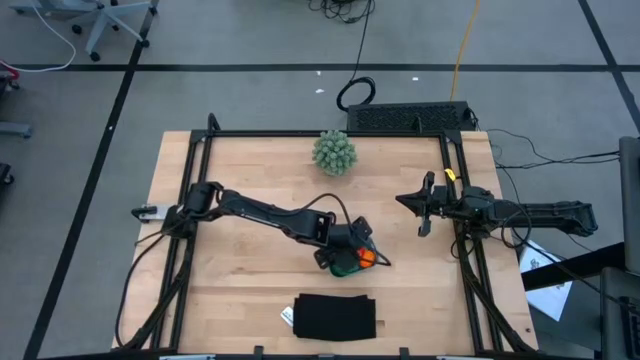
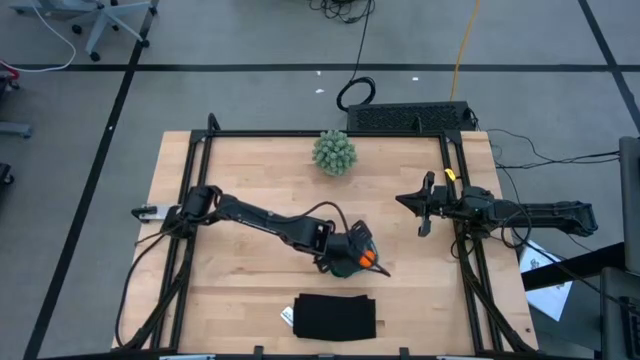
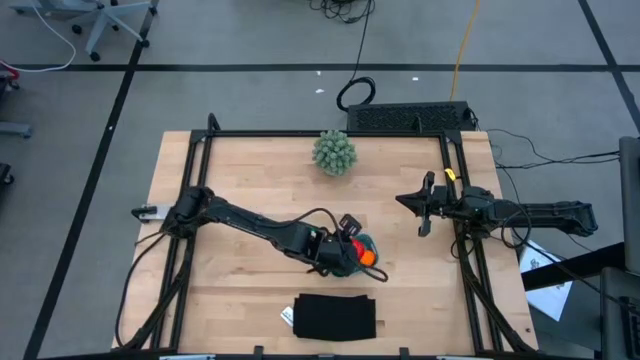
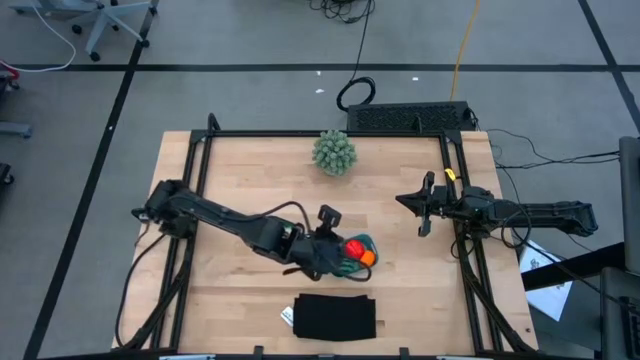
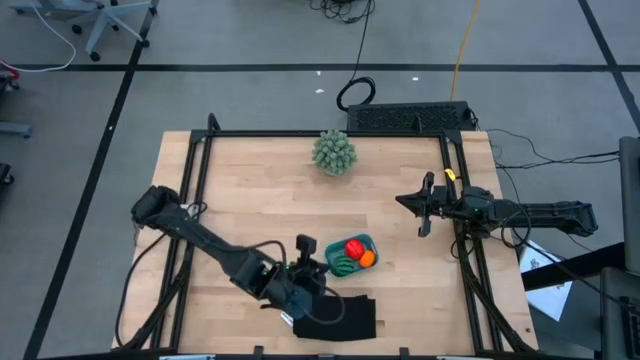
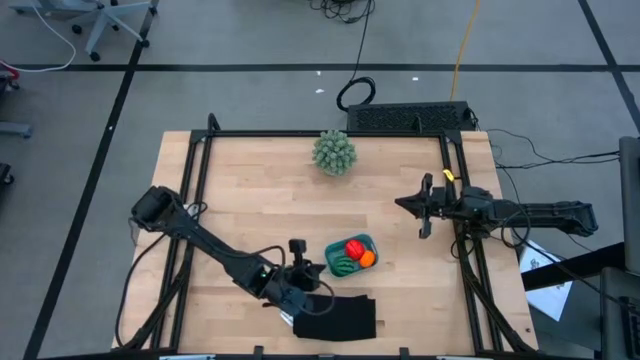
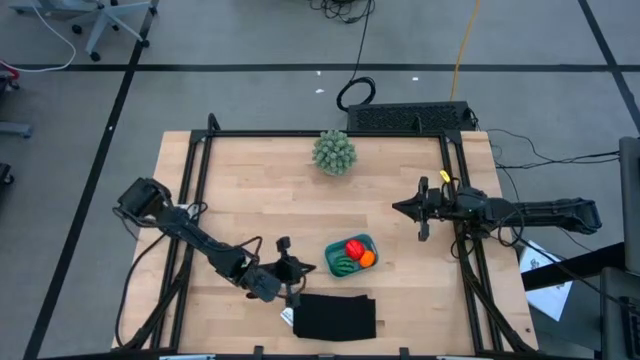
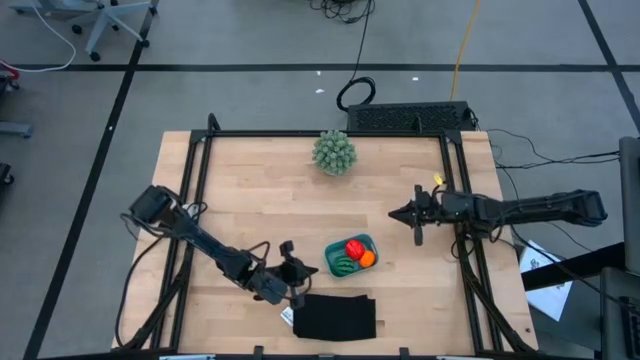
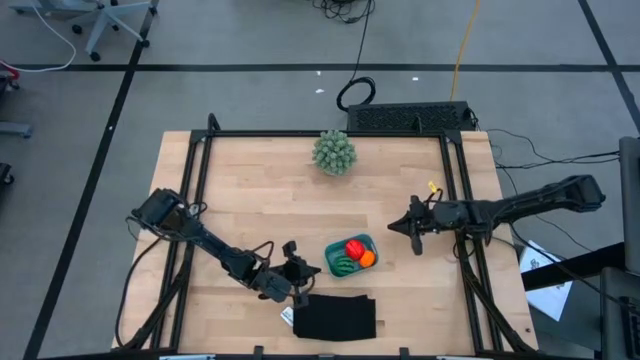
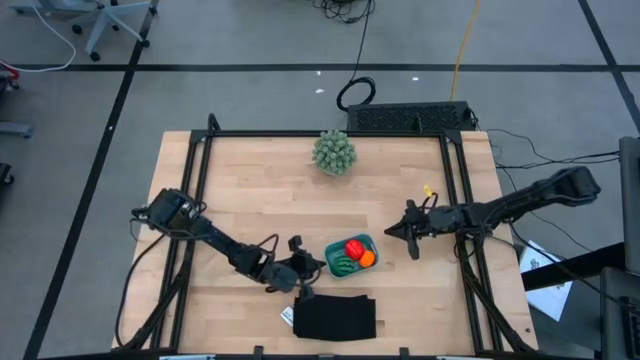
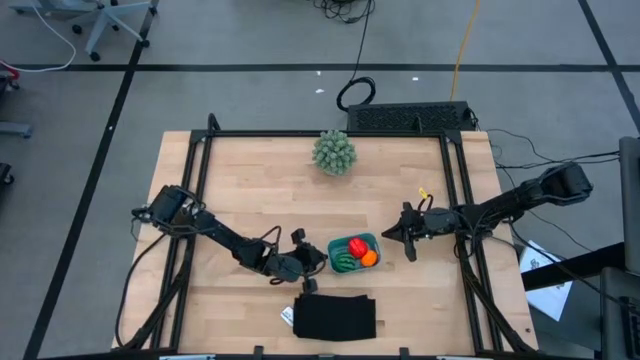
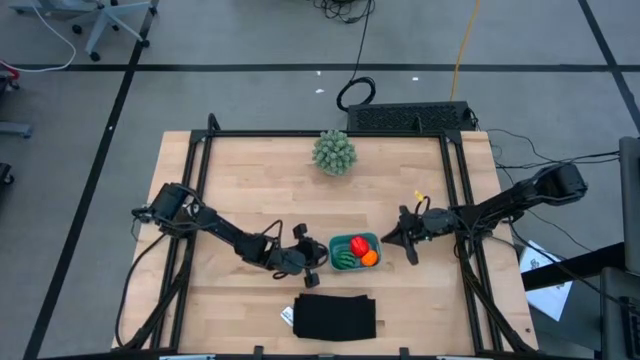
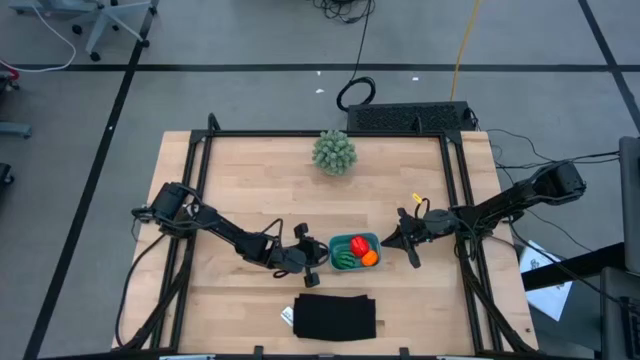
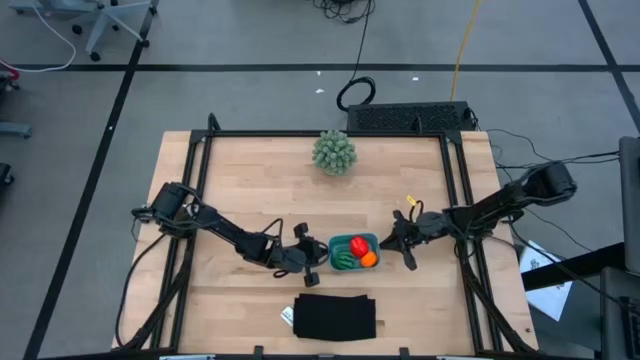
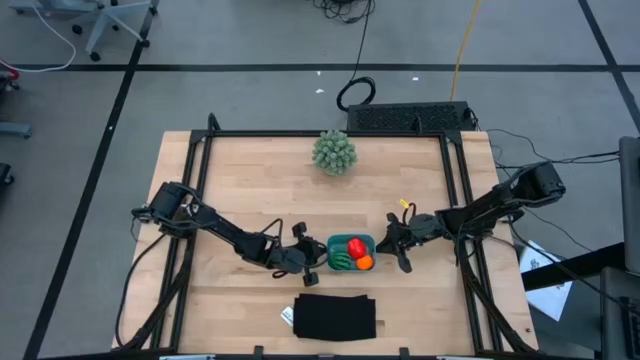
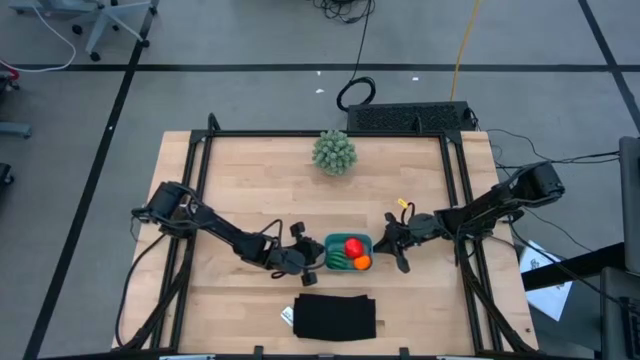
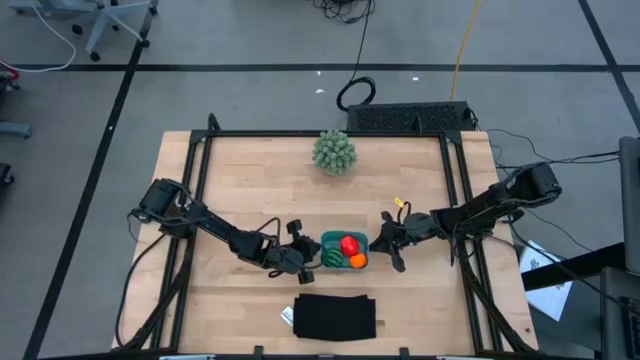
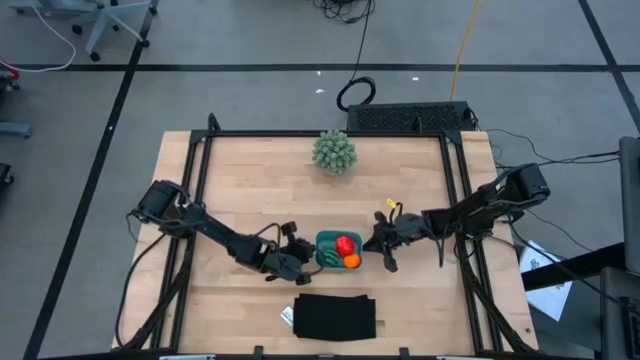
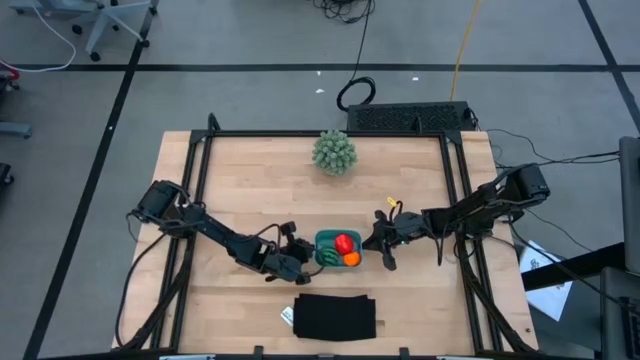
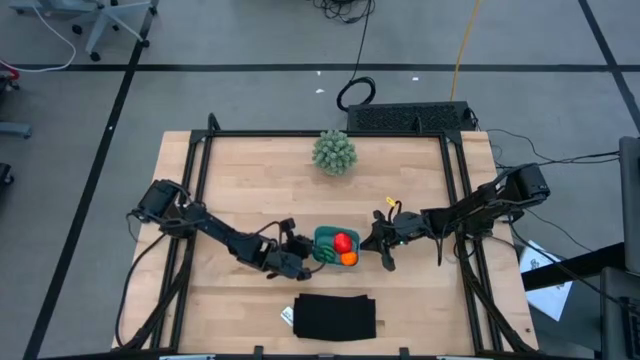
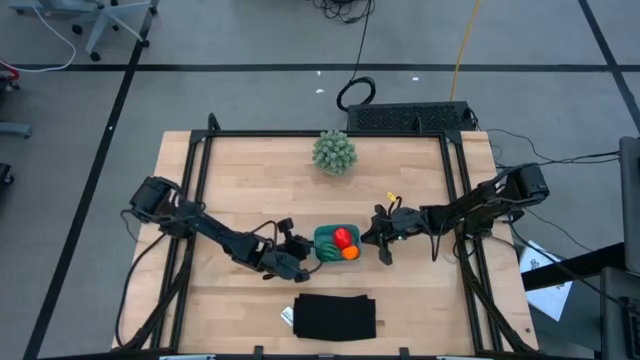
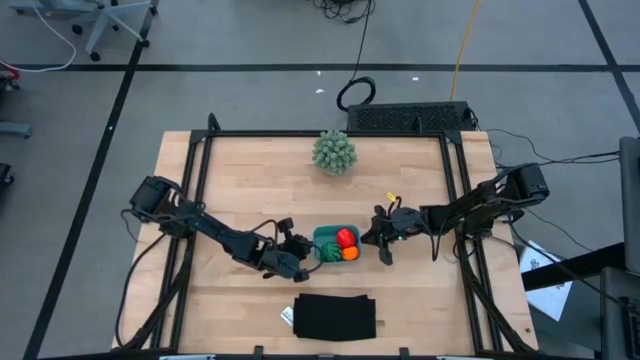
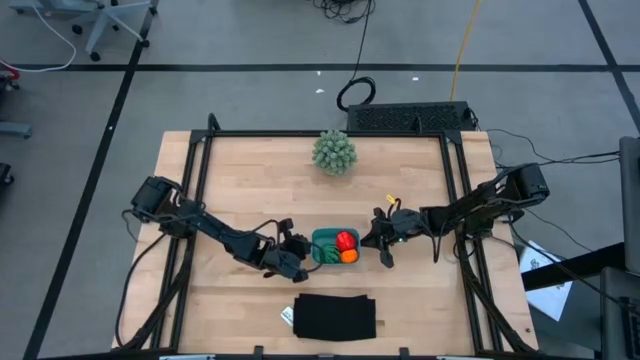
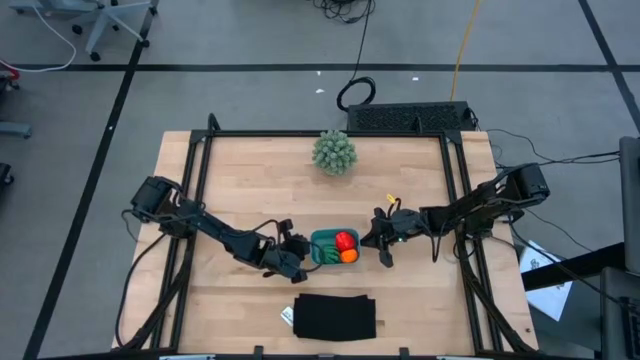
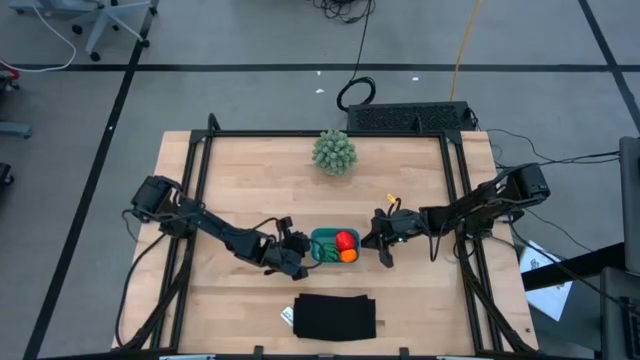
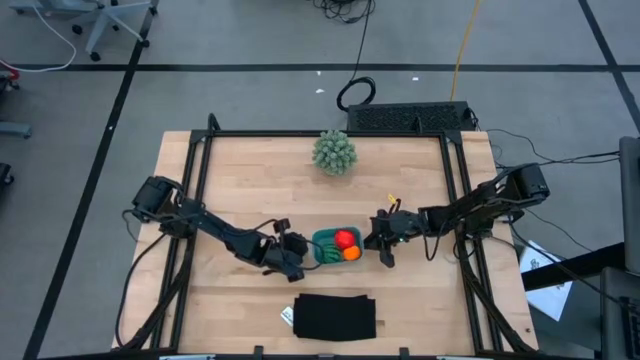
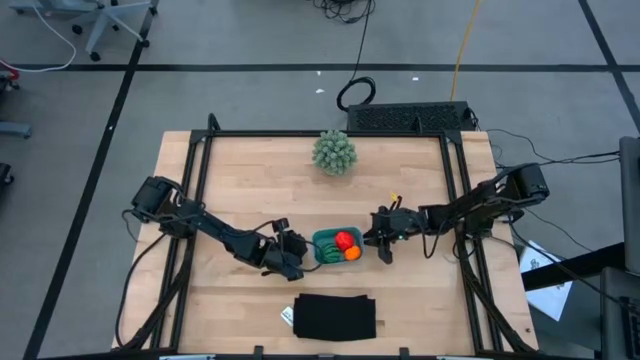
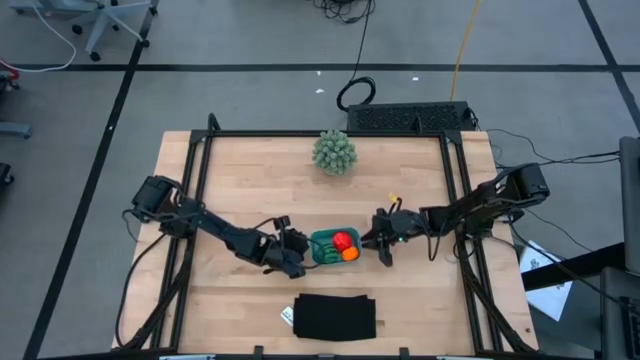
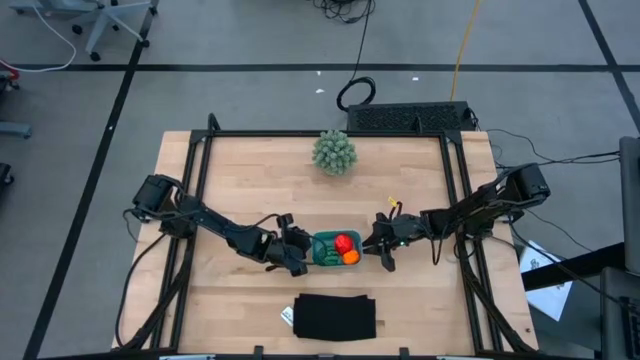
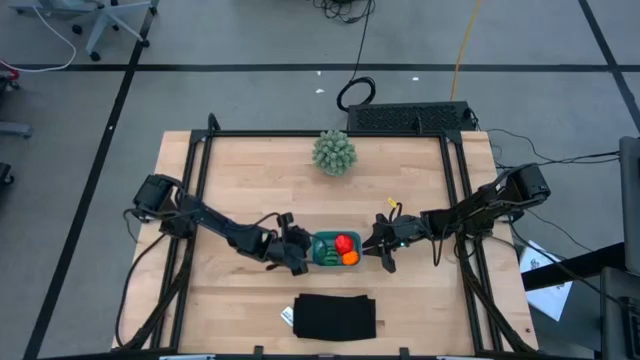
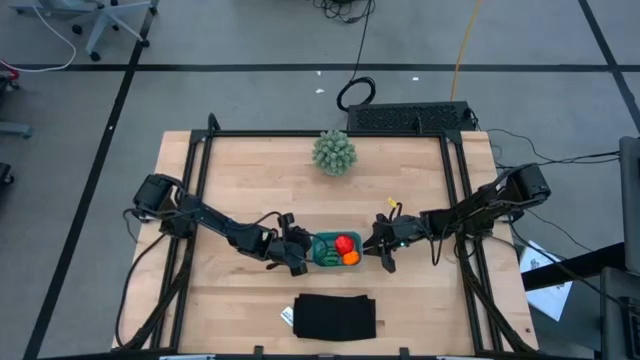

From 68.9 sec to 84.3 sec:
Task: Pick and placing Produce into tupperware
Adjust the blue bin on the table

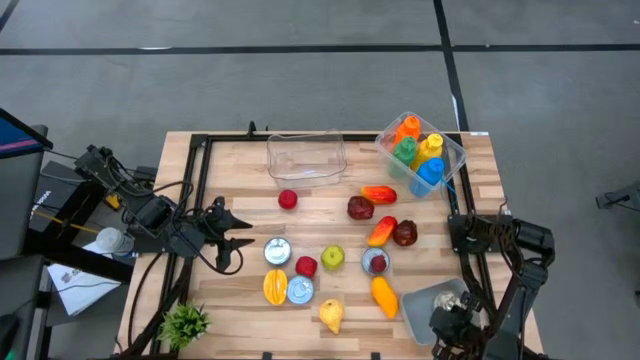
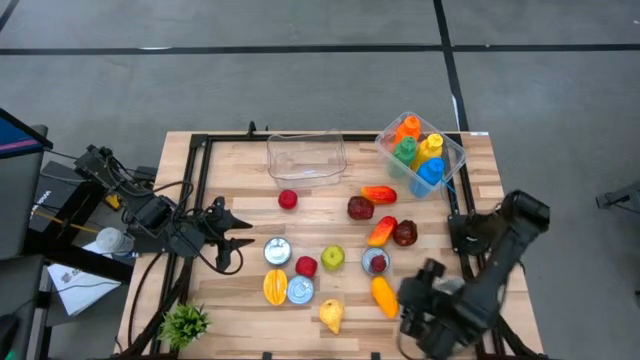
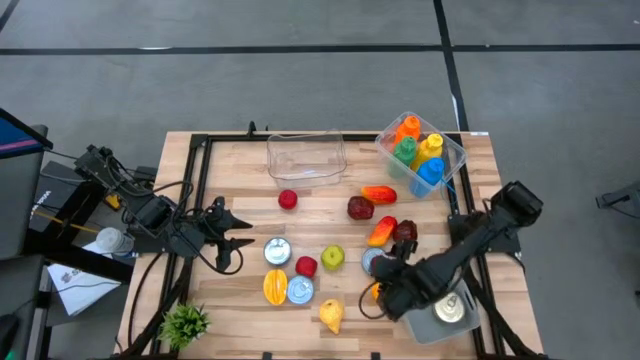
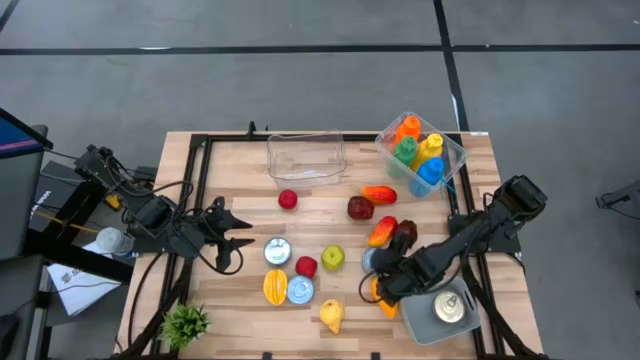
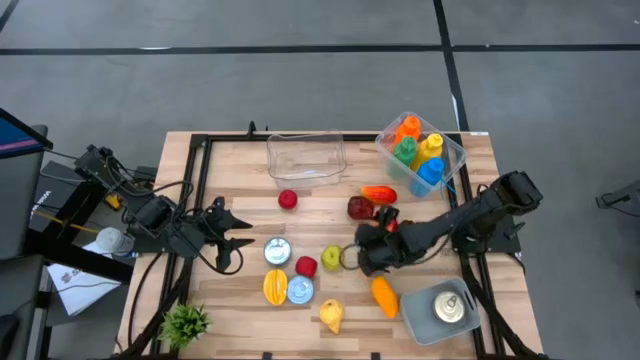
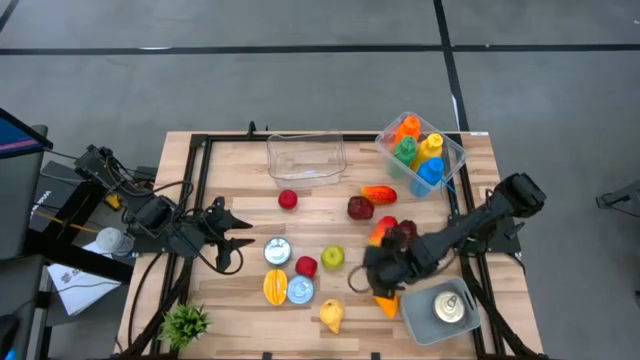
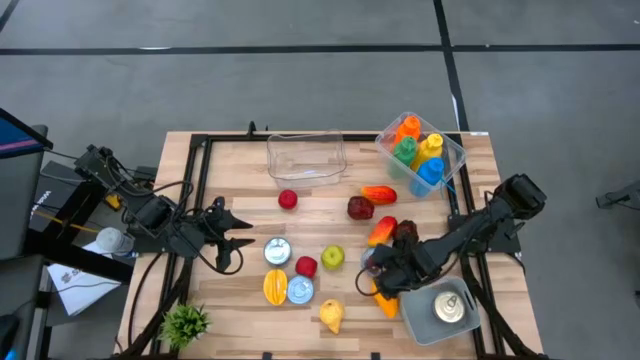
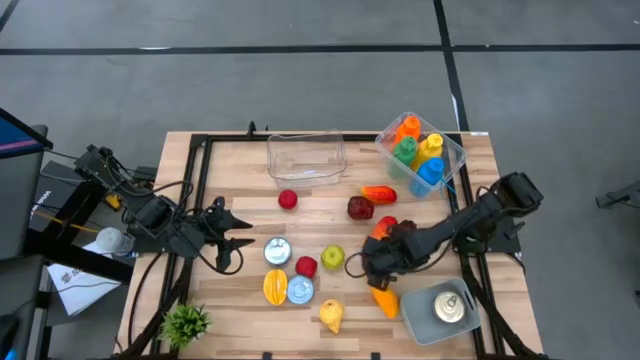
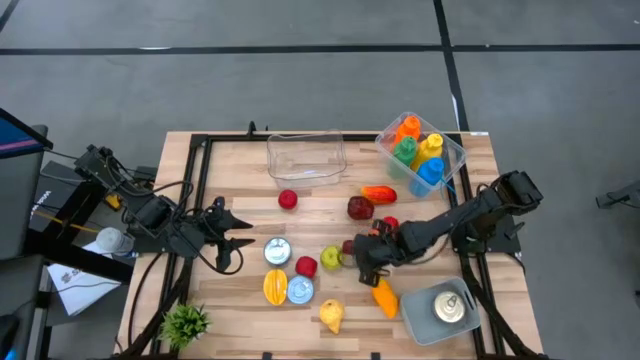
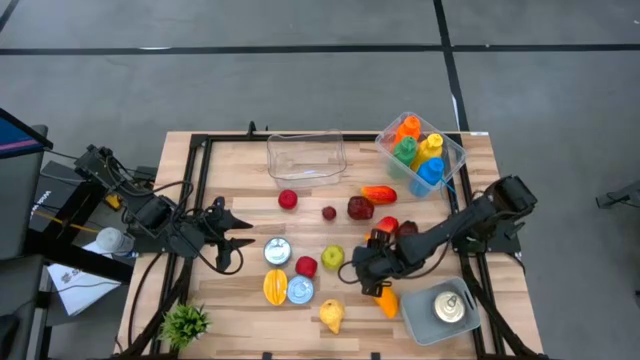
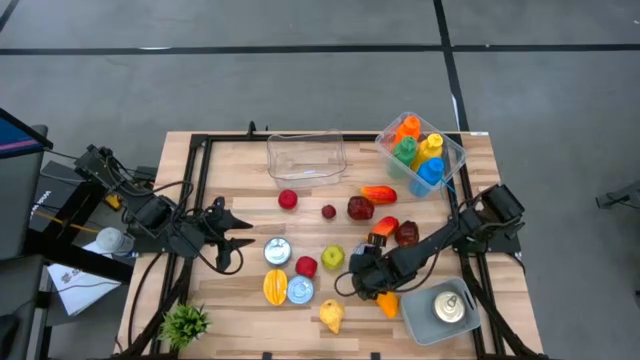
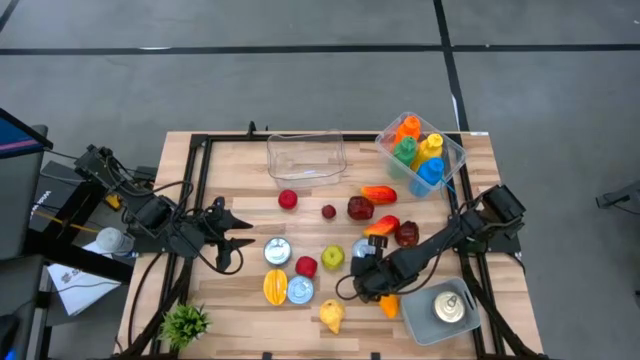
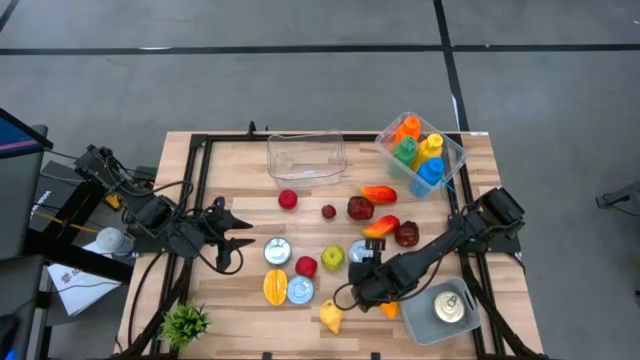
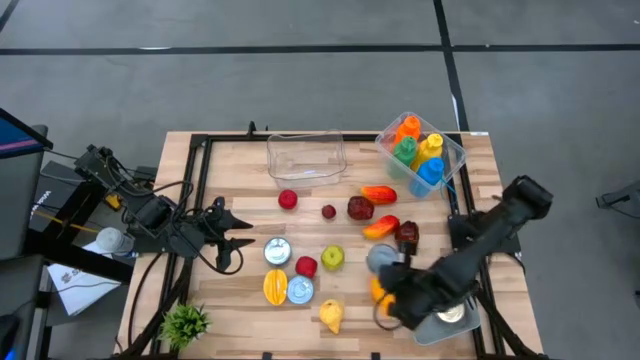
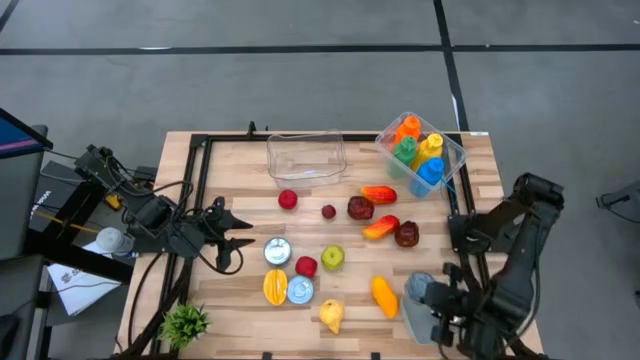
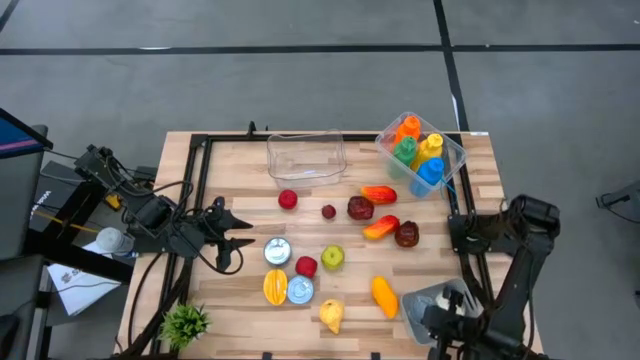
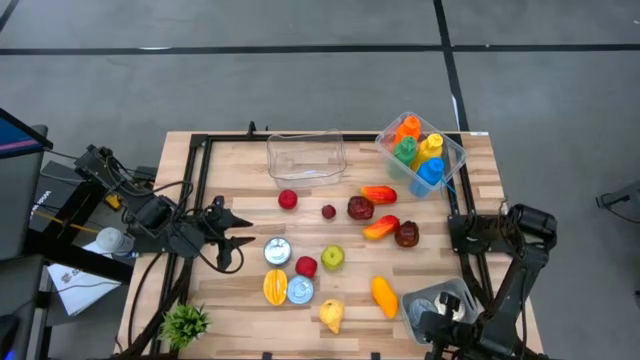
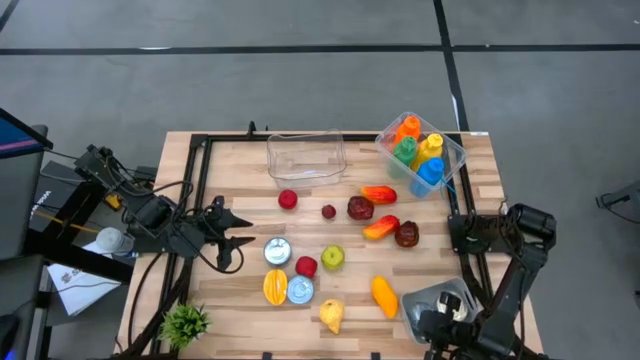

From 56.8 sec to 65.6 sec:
Task: Pick & Place Food Item
Put the green tuna can into the gray bin
